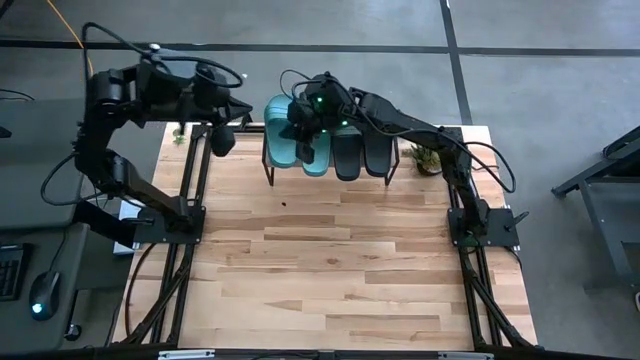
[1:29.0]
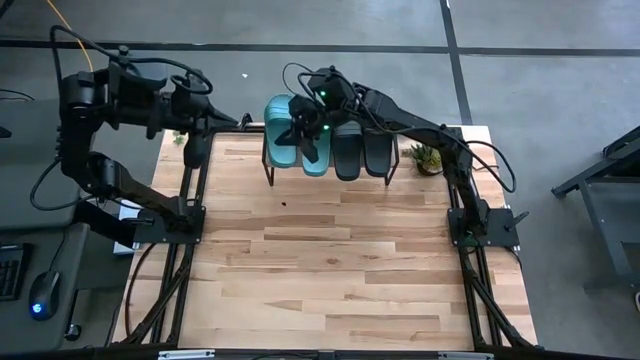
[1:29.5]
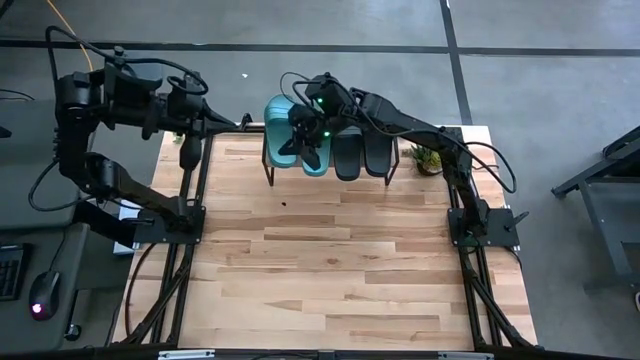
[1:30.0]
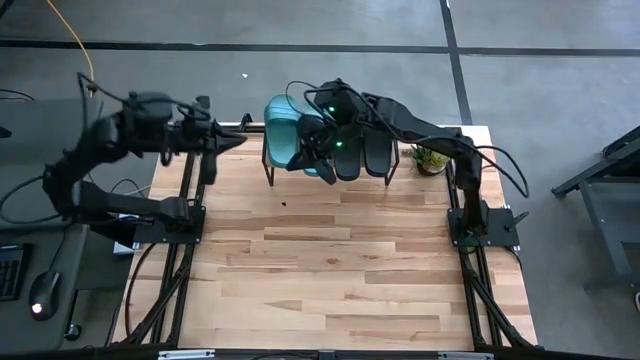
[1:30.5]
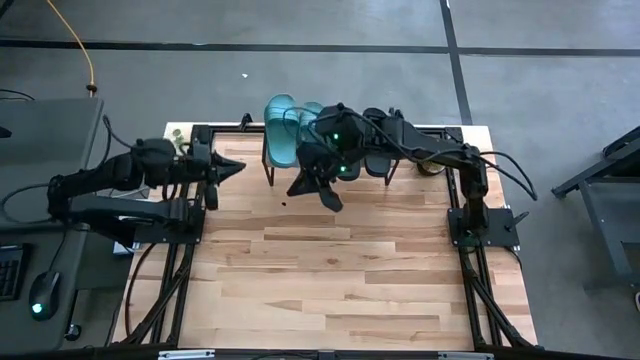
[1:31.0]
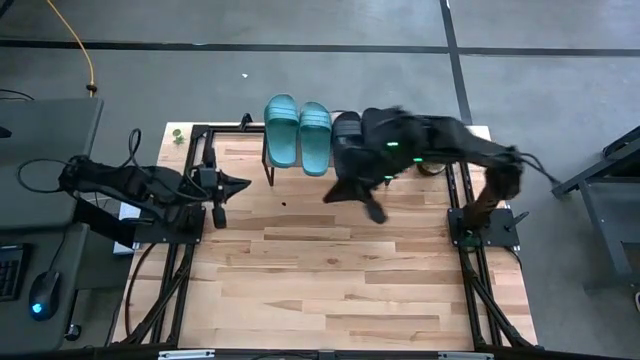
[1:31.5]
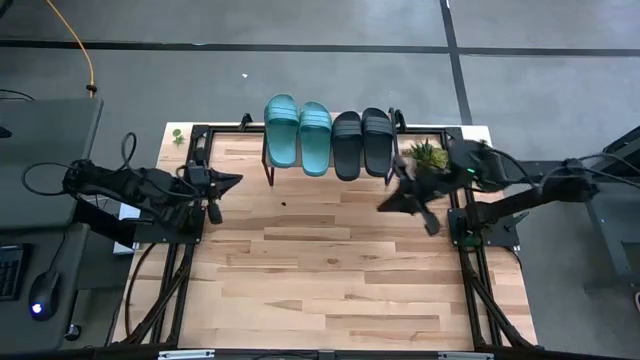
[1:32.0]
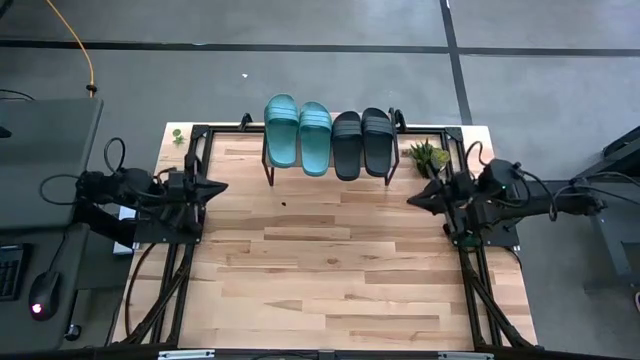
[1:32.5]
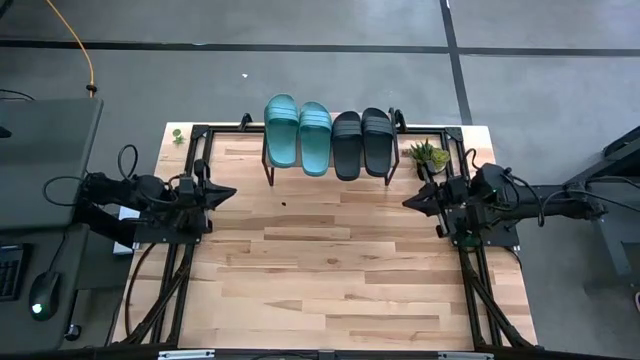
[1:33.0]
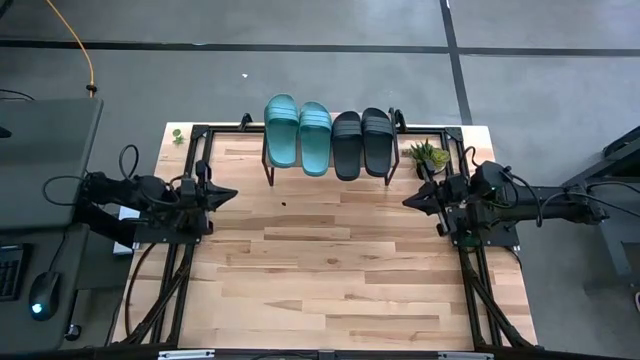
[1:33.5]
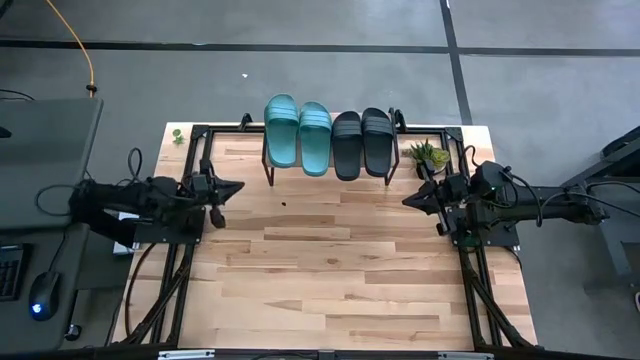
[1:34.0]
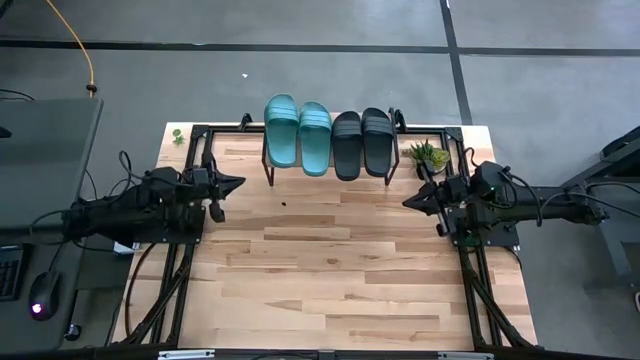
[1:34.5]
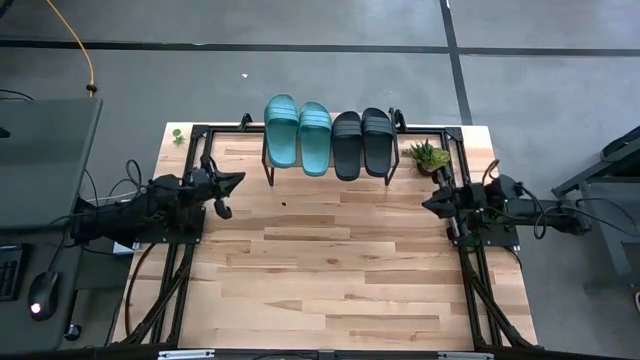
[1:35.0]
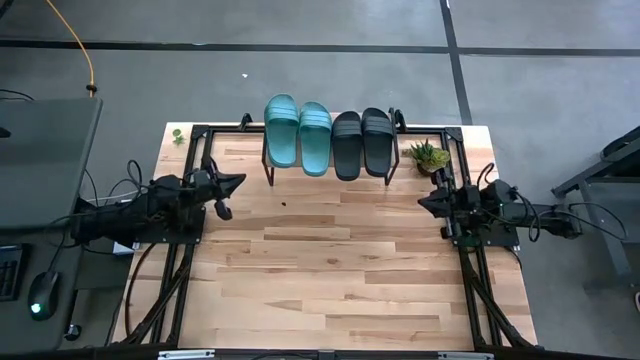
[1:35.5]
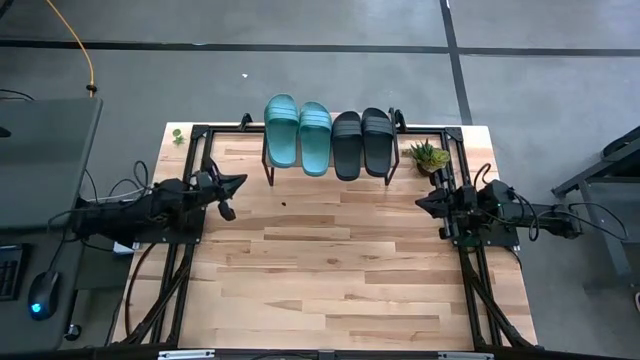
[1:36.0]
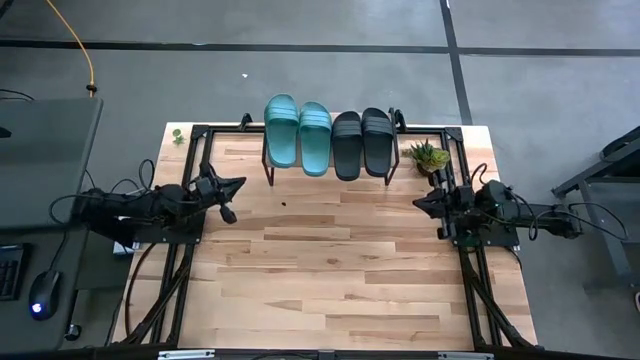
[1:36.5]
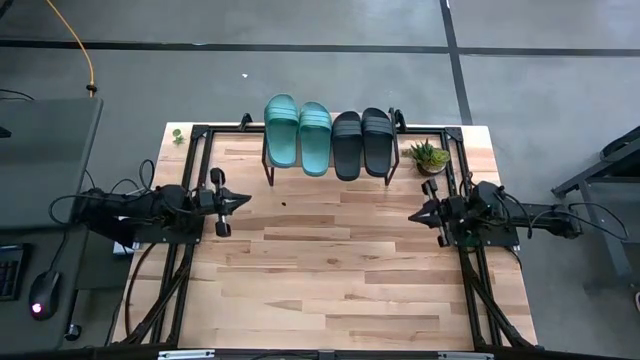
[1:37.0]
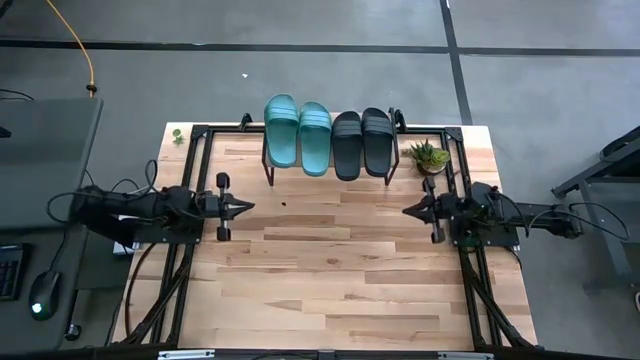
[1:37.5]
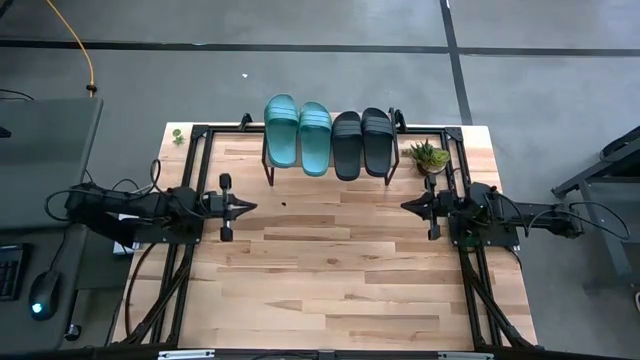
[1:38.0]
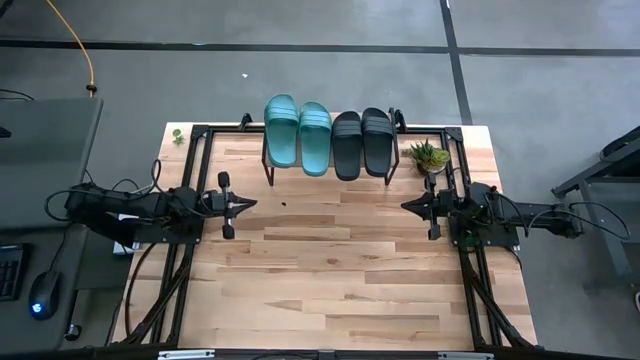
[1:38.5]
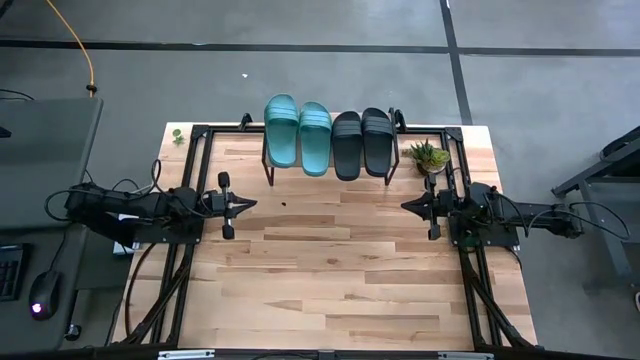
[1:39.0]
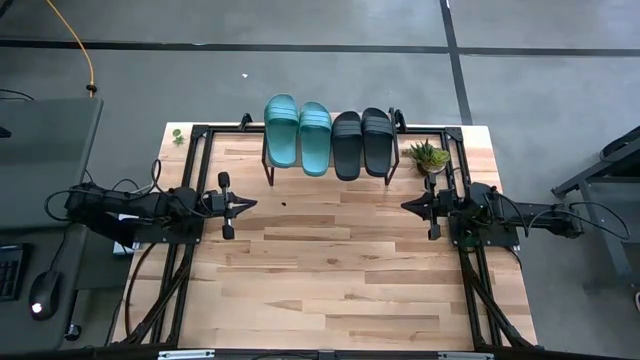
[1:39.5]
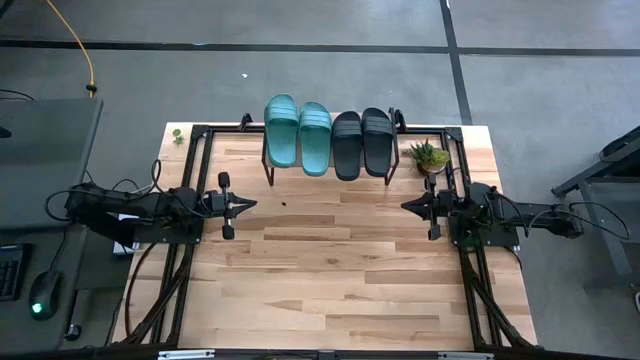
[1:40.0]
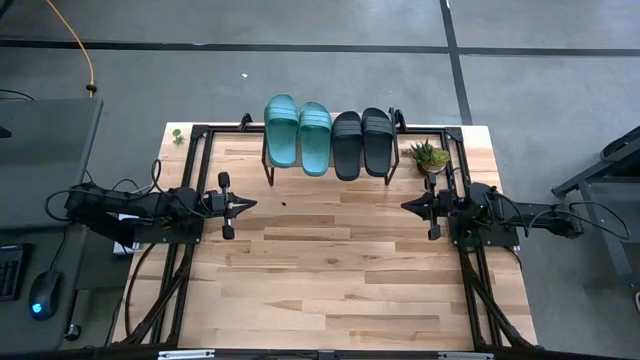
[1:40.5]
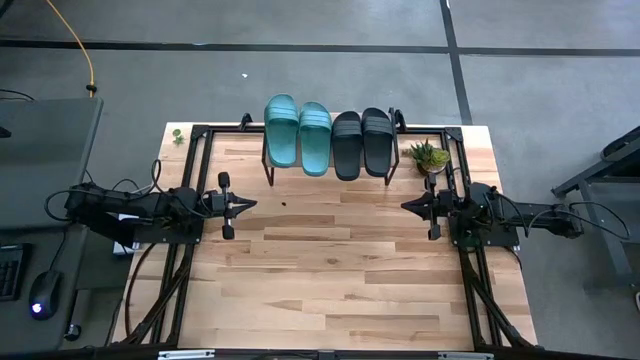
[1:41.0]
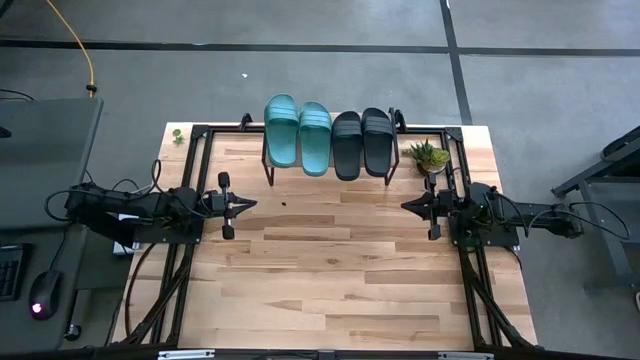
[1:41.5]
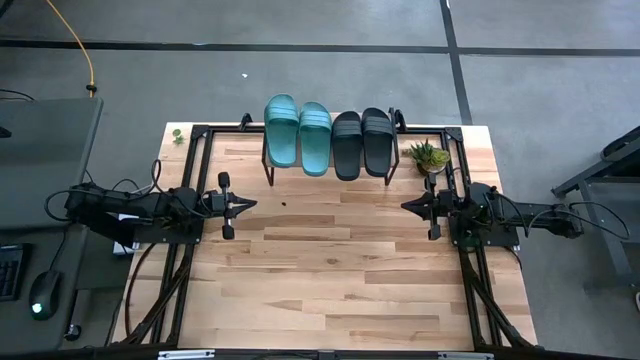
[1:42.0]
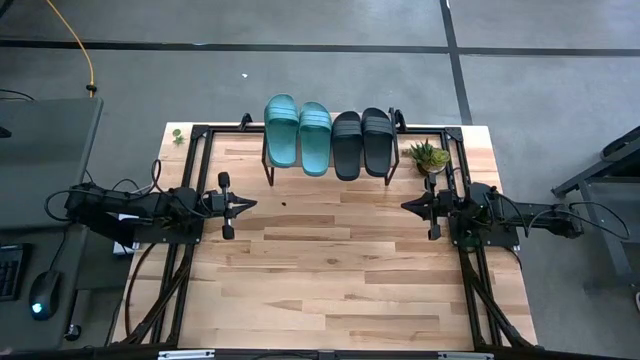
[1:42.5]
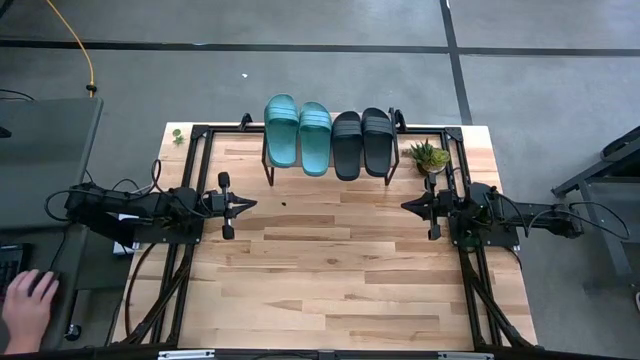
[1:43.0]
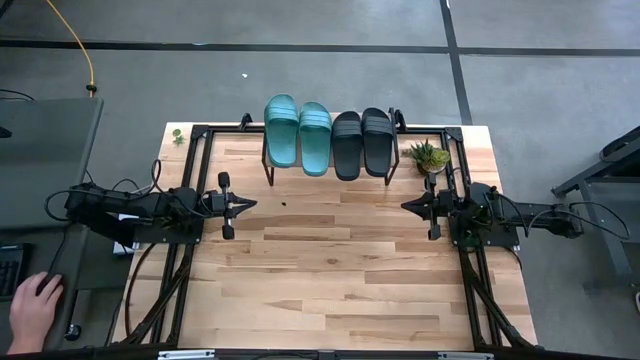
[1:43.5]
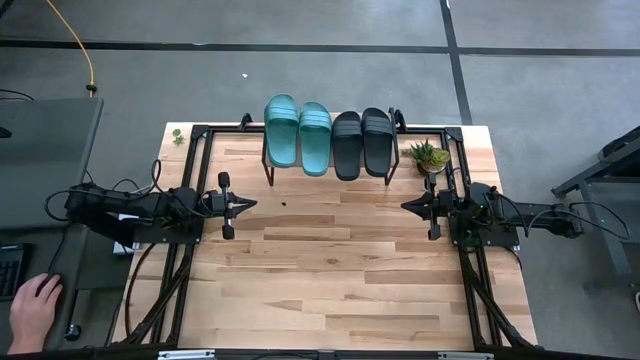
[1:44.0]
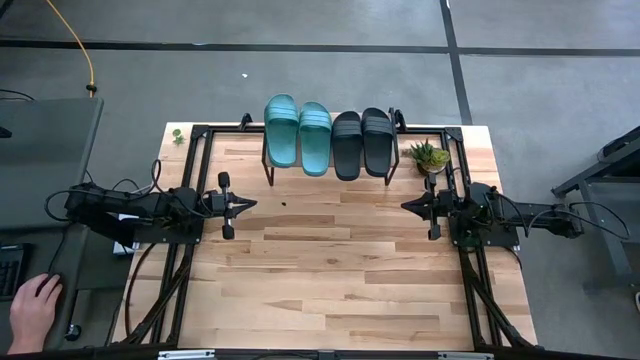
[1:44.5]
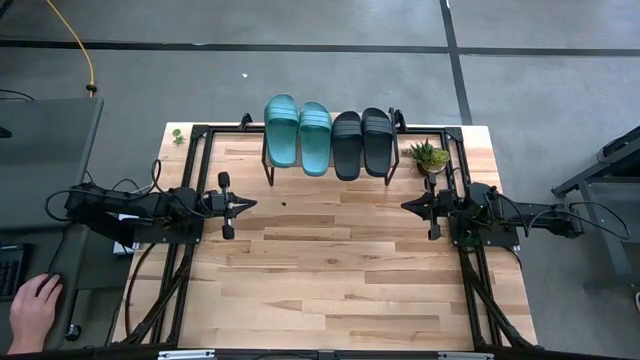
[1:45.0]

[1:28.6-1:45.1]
Task: Pick and place slides into the shelf
Return to Home Position

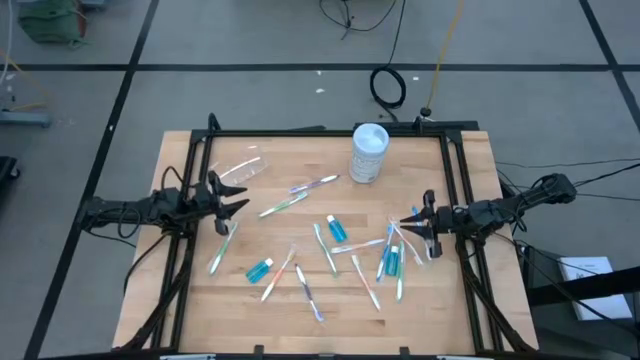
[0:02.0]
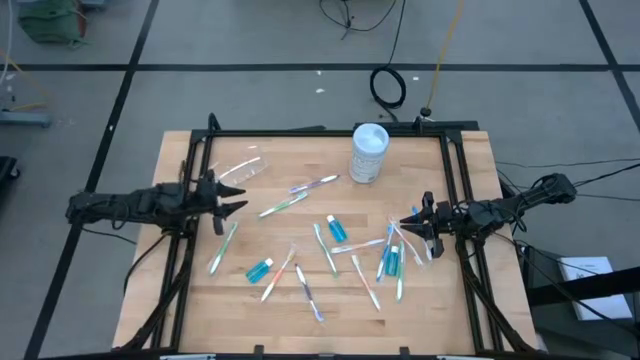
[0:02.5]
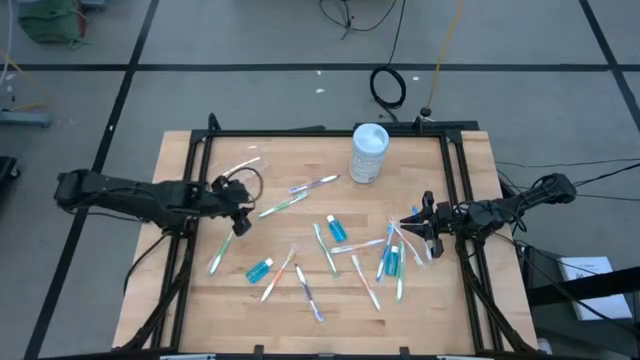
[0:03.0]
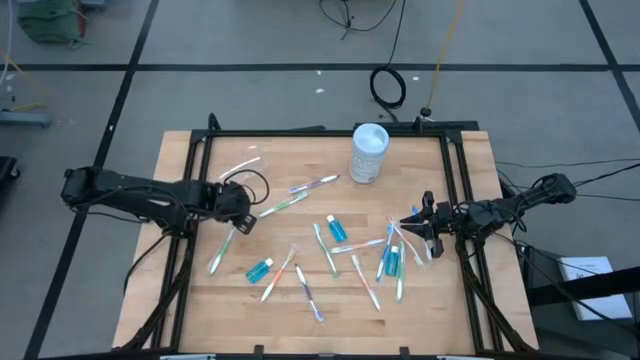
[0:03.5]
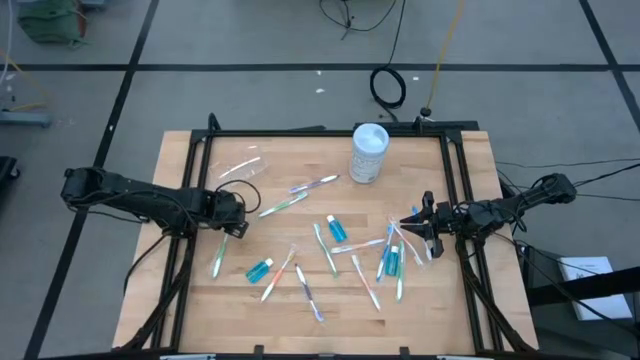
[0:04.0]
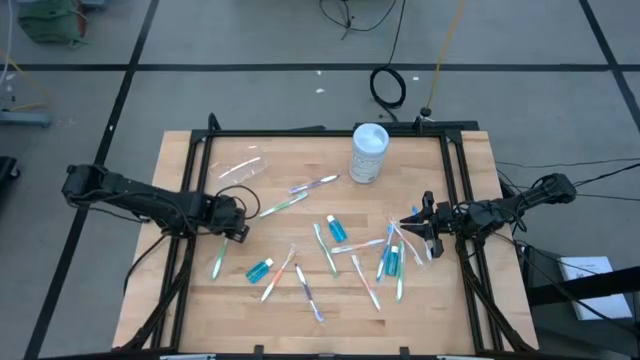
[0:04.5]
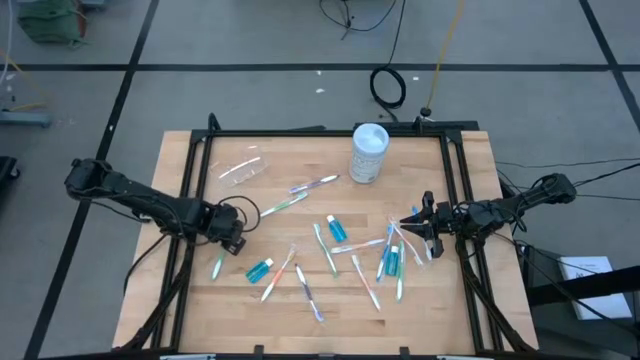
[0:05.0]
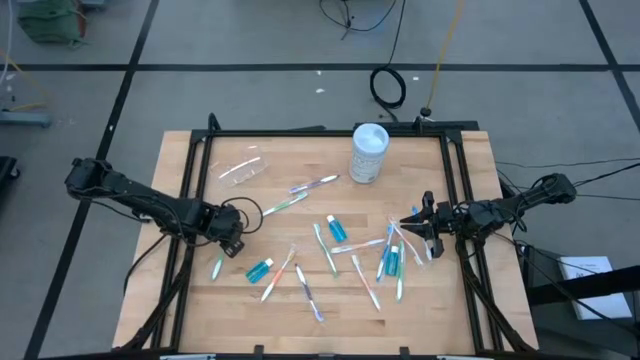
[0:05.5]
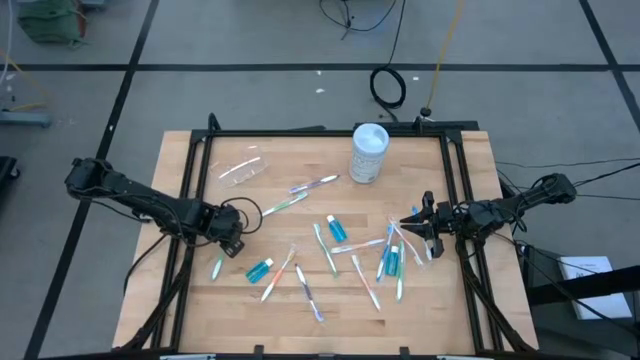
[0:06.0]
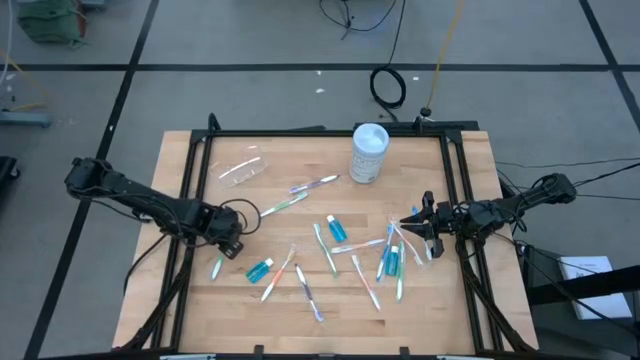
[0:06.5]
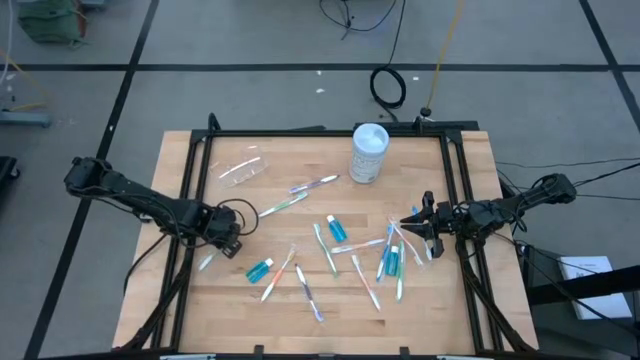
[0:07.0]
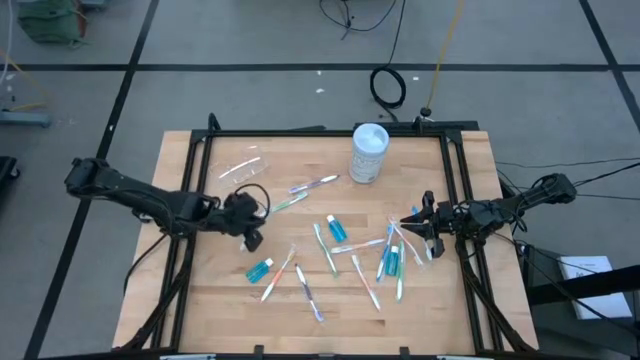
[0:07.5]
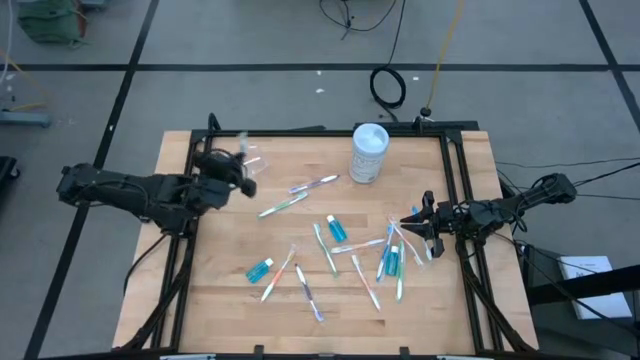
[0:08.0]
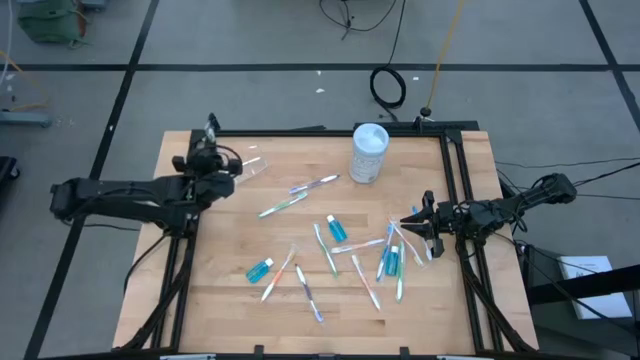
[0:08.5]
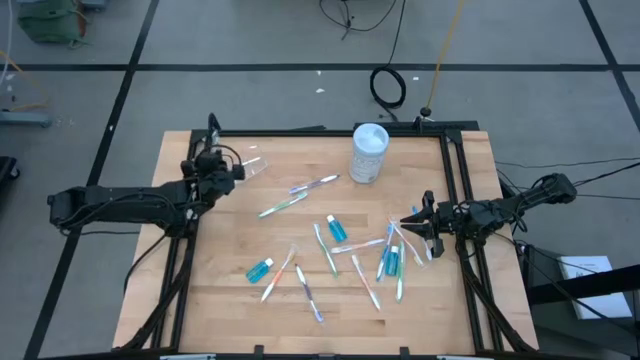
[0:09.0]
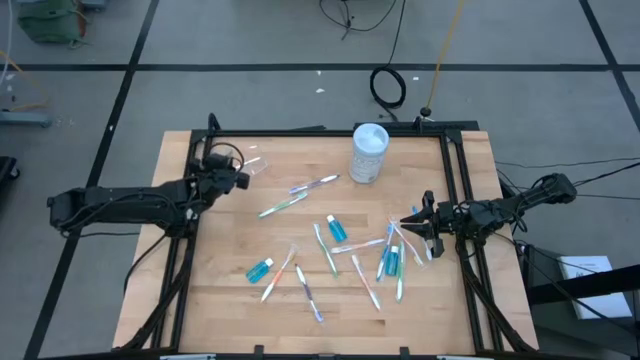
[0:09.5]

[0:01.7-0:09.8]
Task: Pick & Place toothbrushing station
Put the green toothbrush into the transparent organizer
